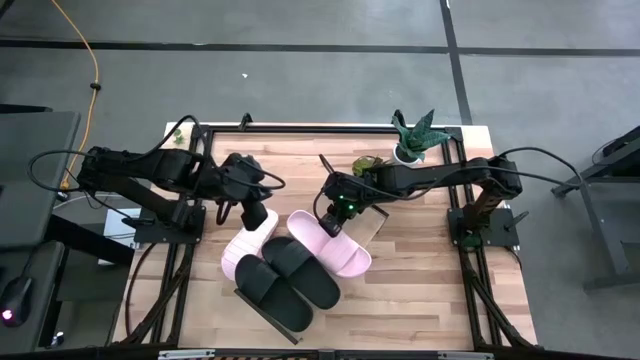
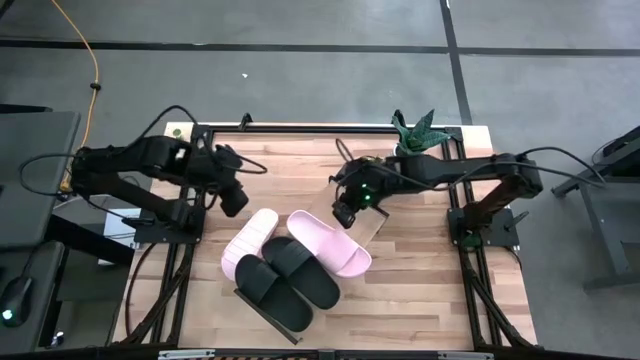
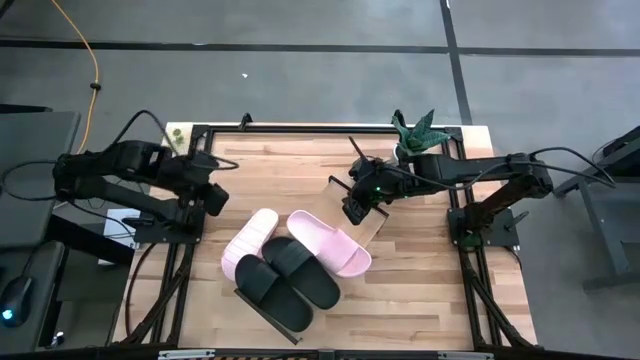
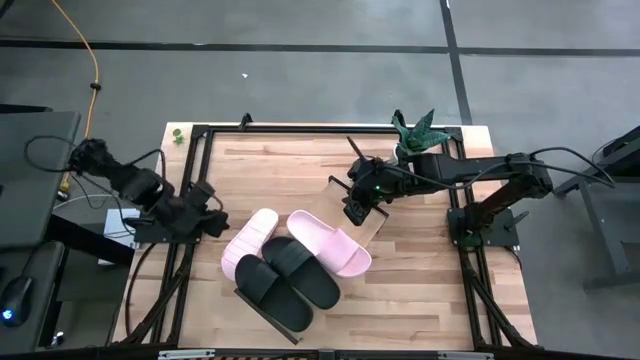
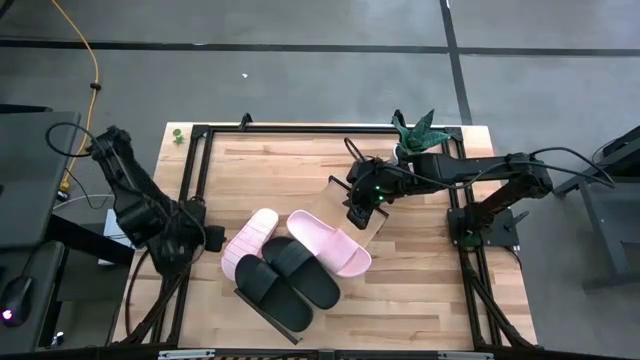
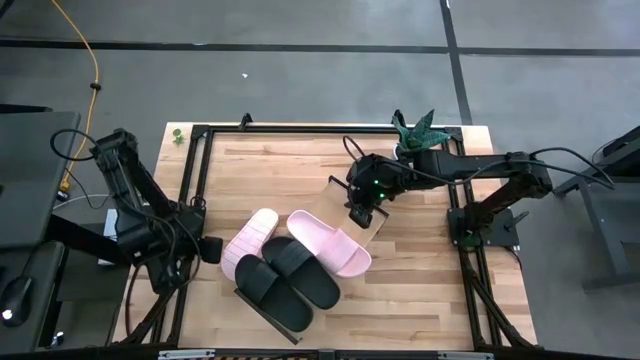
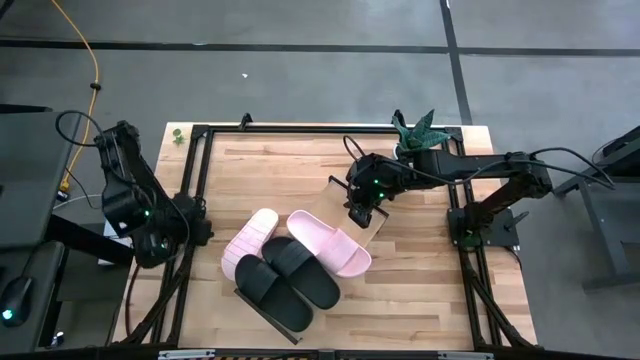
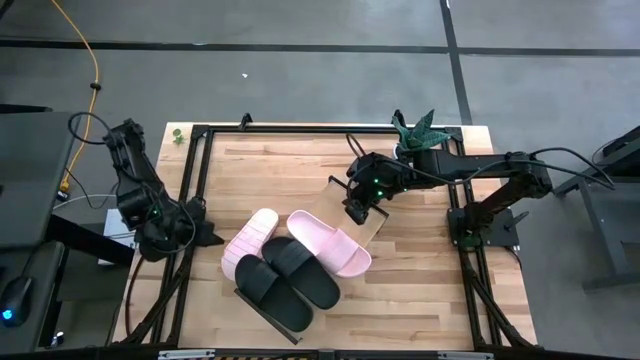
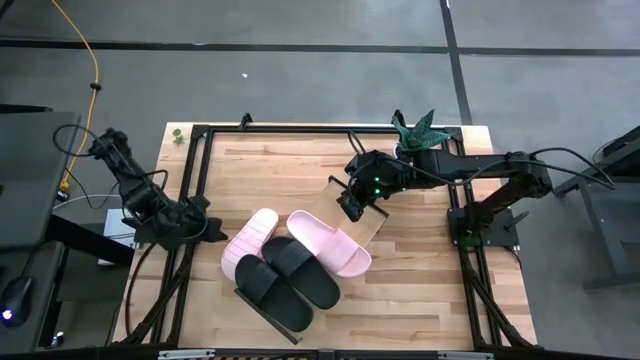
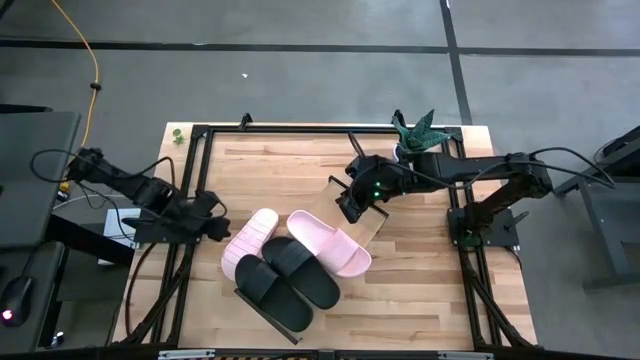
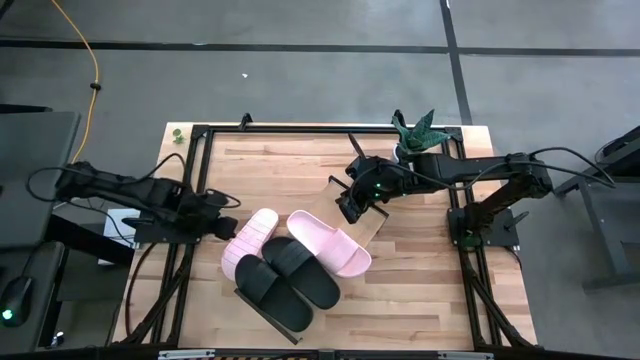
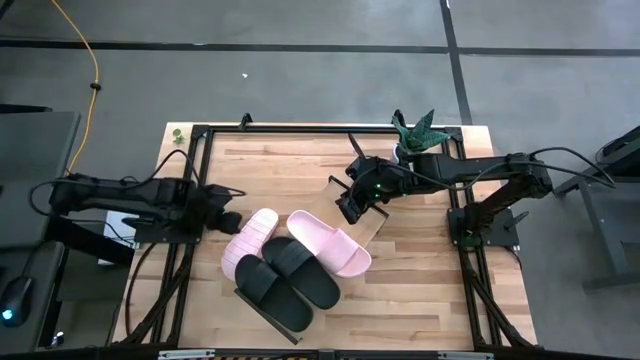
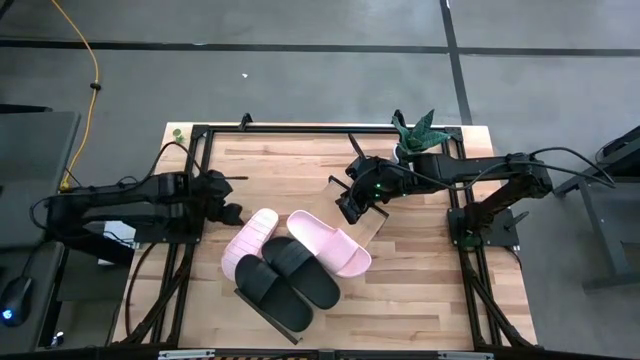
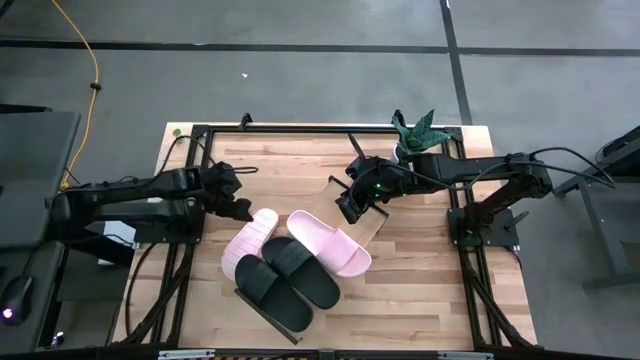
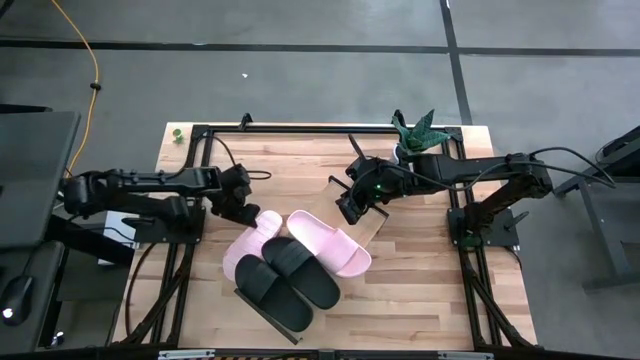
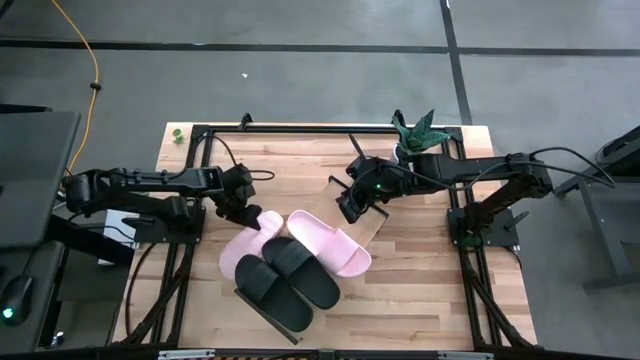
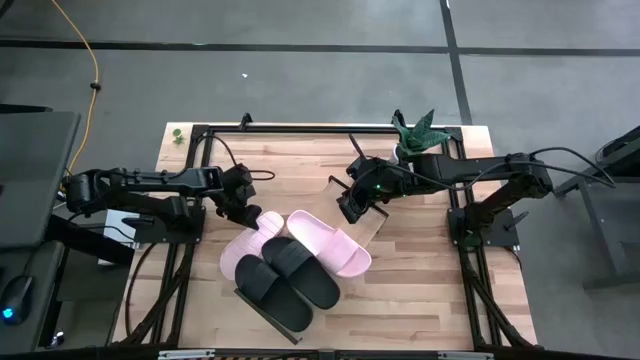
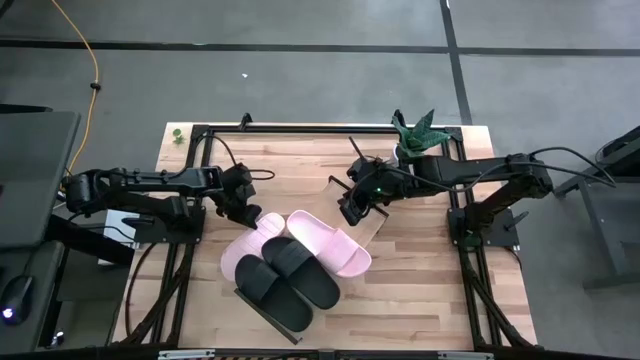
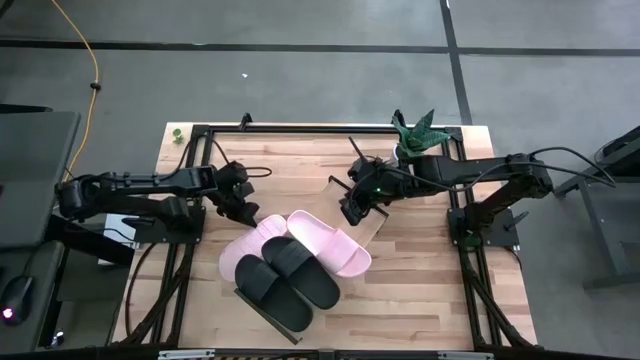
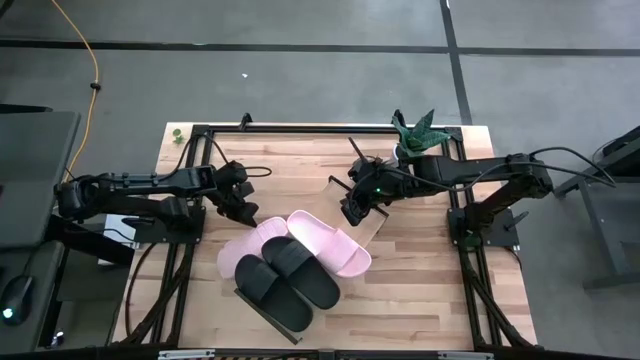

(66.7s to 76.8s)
Task: Pick and place slides into the shelf
Put the pink slide on the shelf

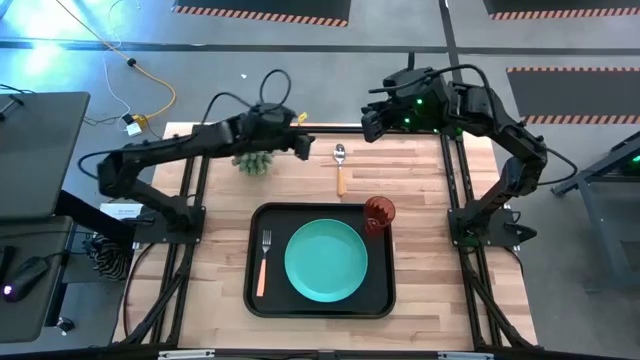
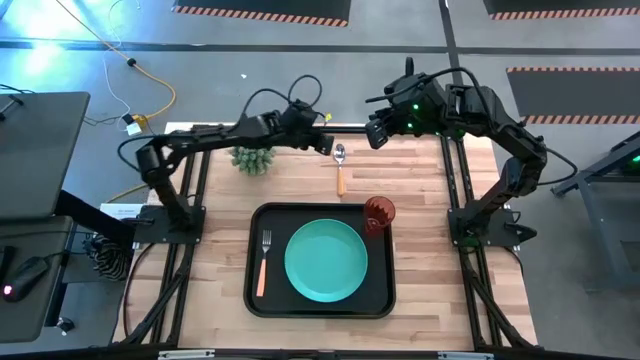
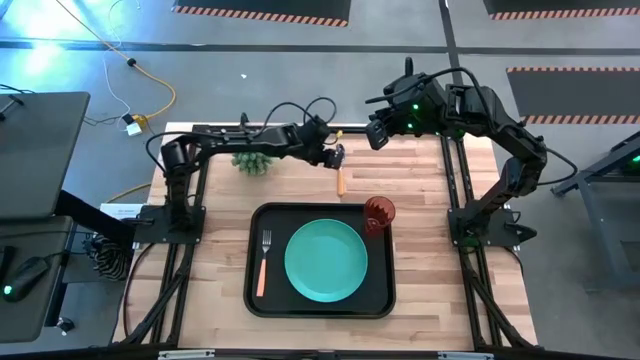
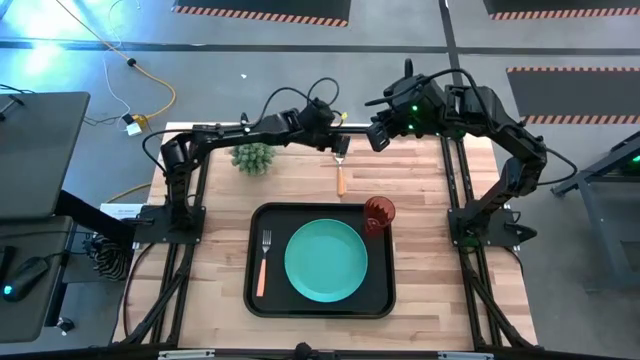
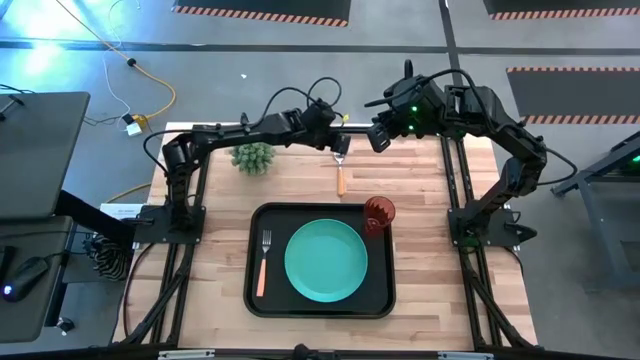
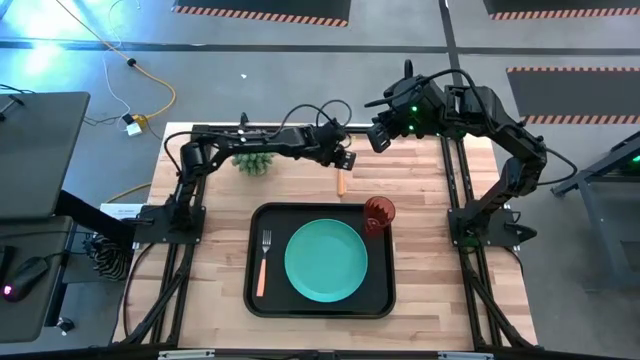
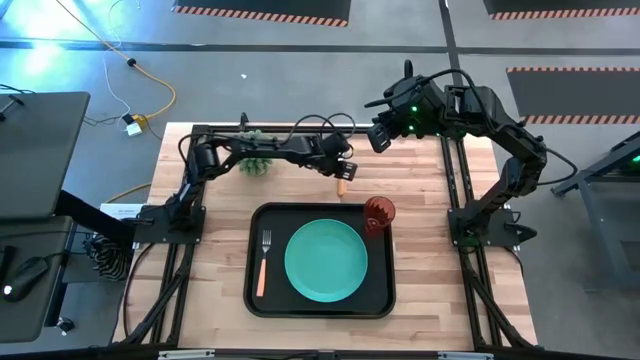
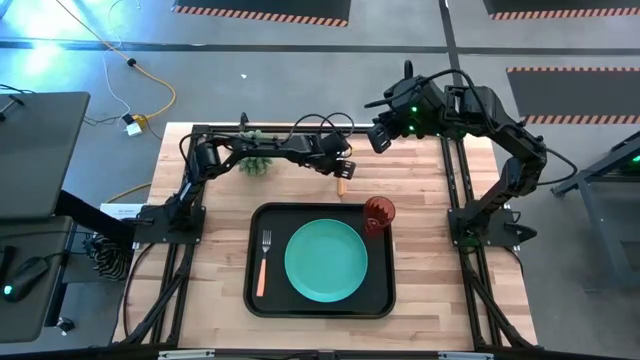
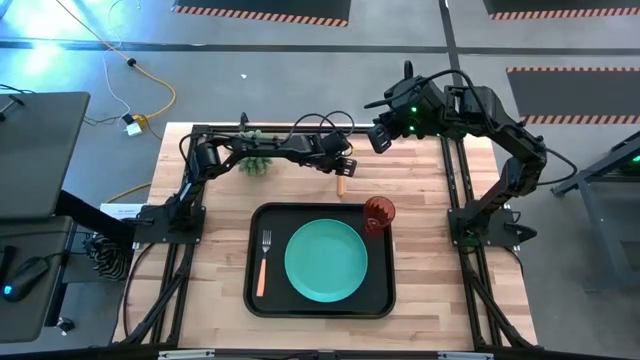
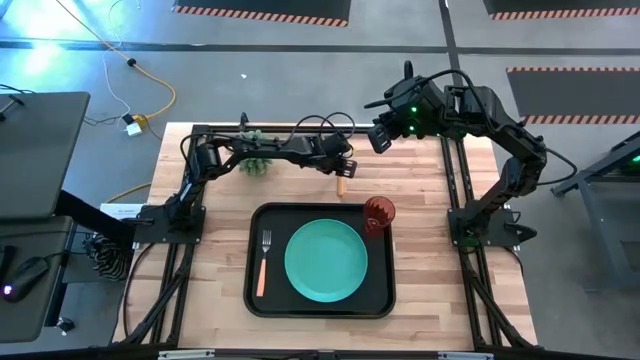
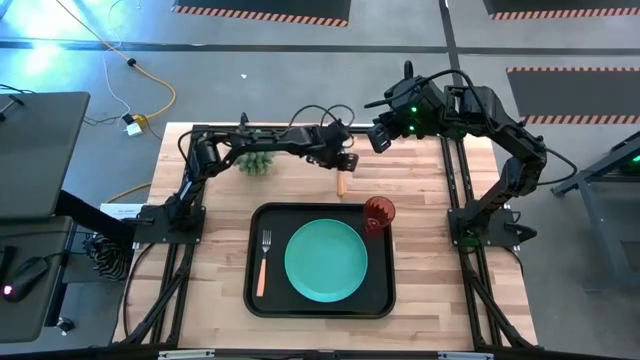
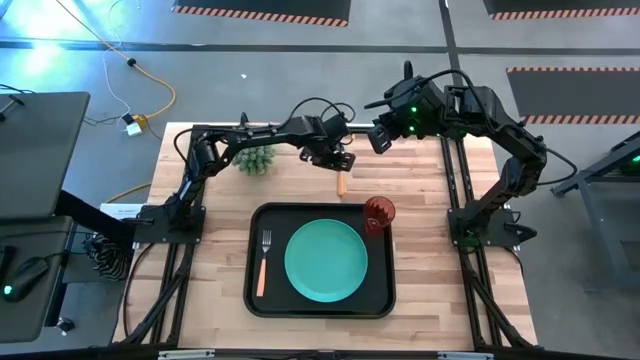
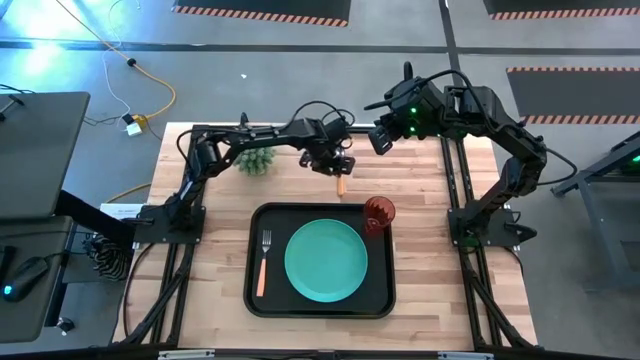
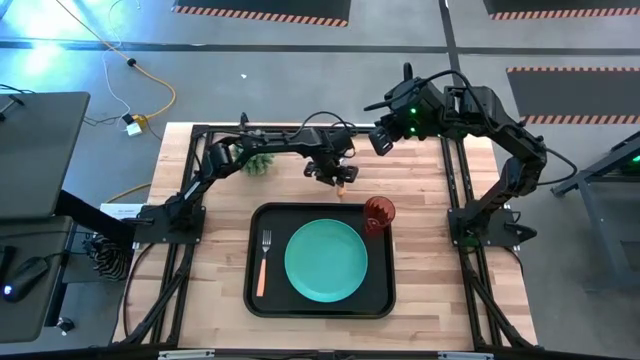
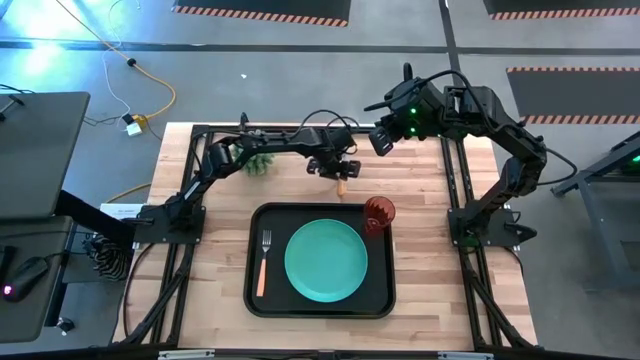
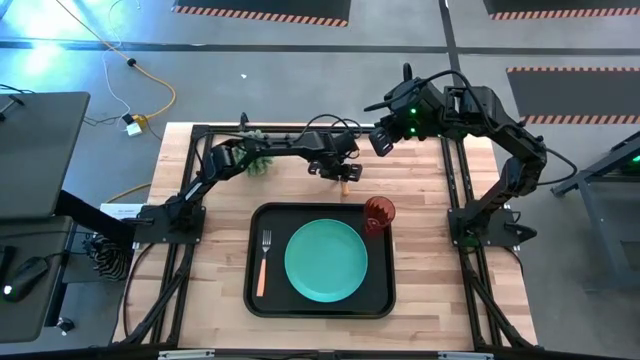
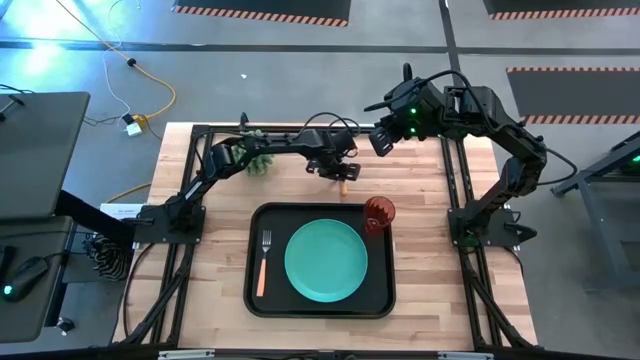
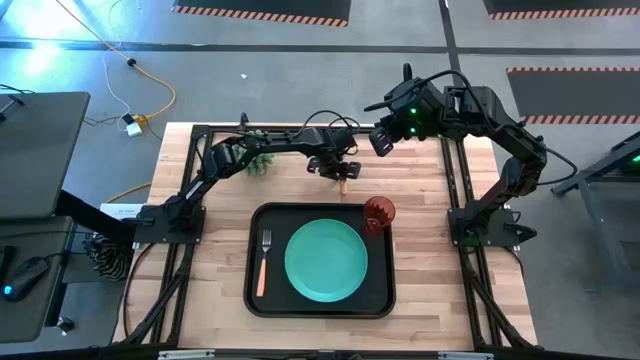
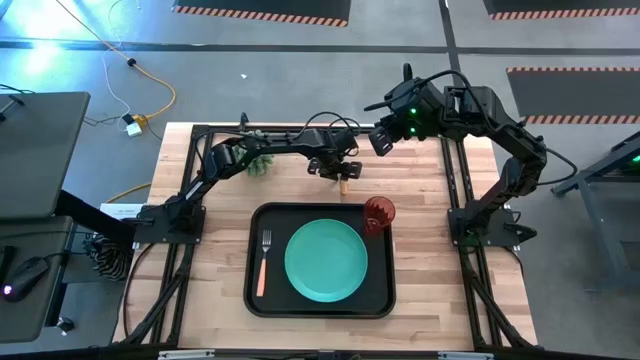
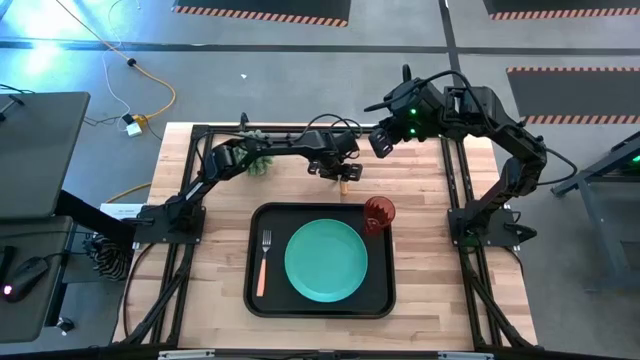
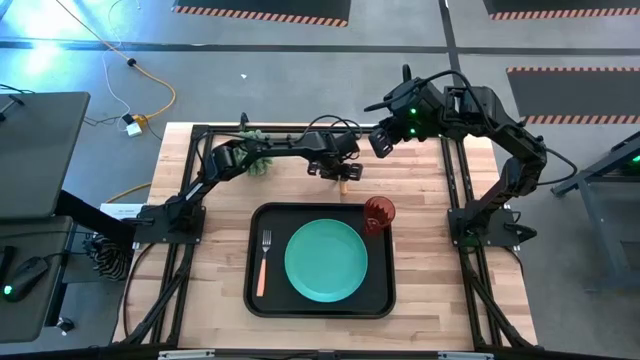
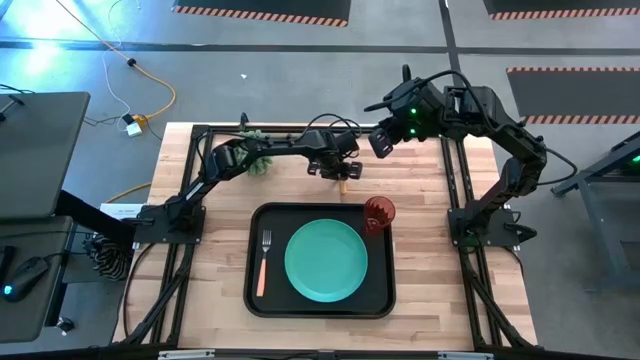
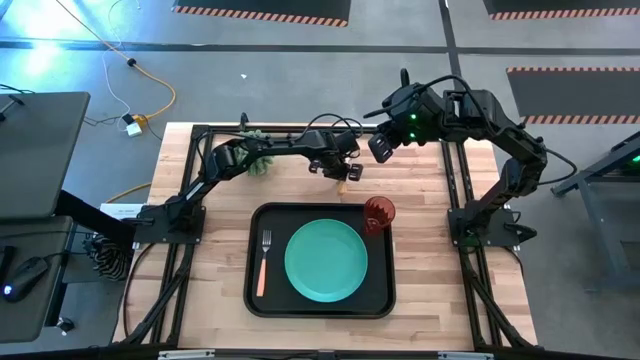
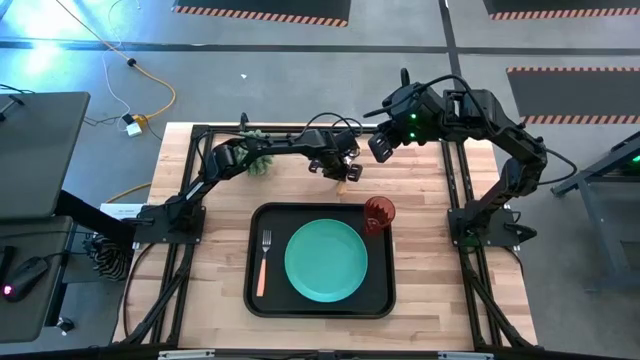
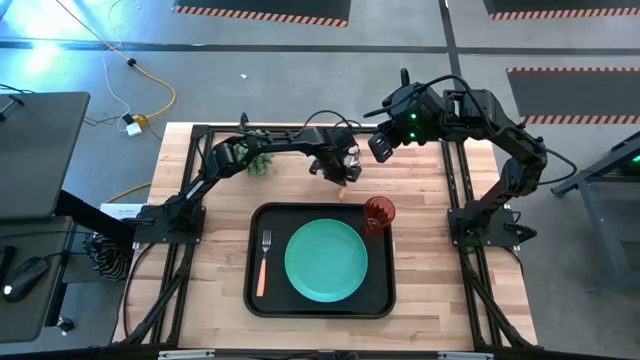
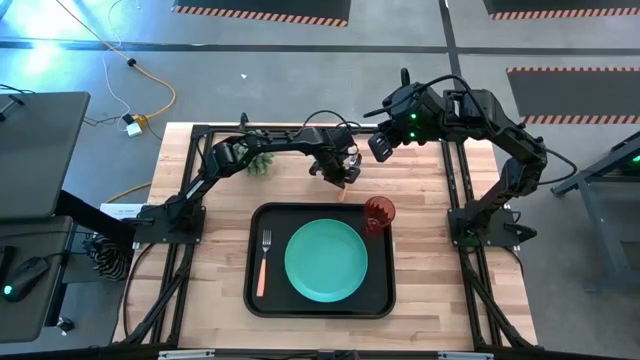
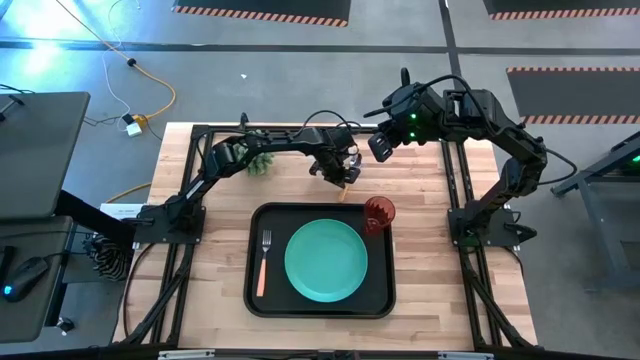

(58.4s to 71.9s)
Task: Pick and place plate/cup/fork/spoon on tray
Put the yellow spoon on the black tray between the orange fork and blue plate
